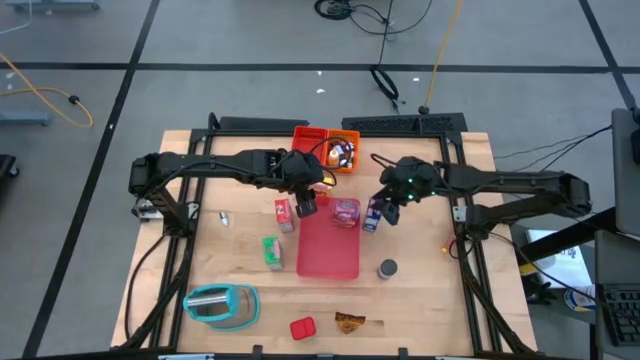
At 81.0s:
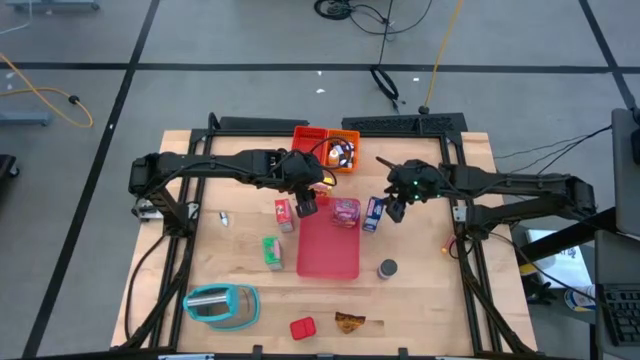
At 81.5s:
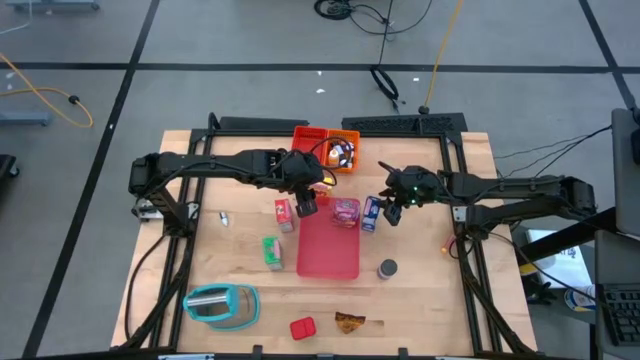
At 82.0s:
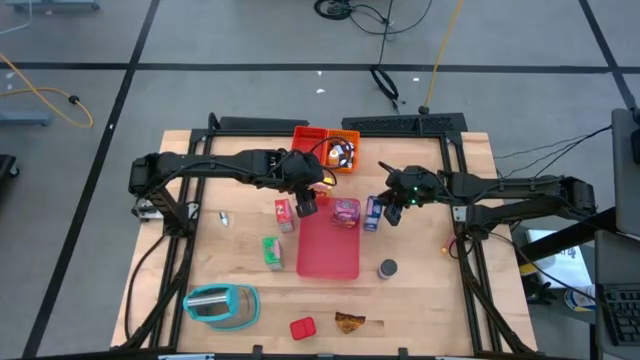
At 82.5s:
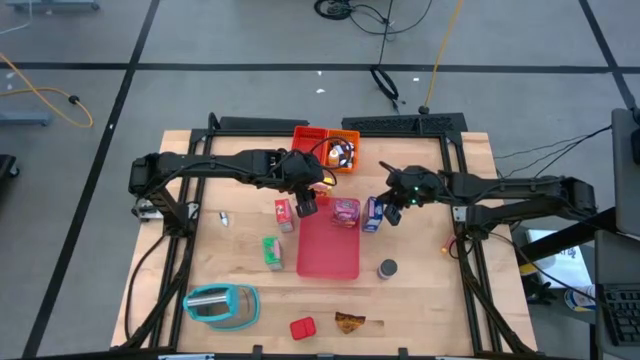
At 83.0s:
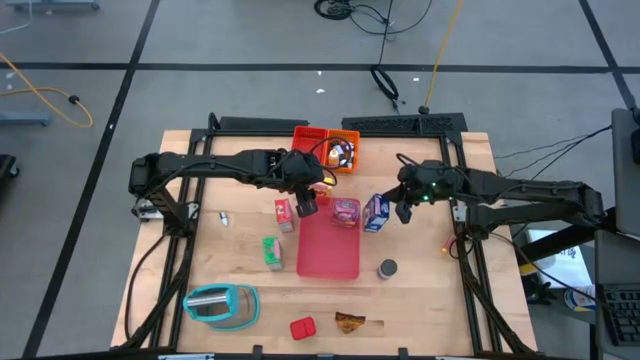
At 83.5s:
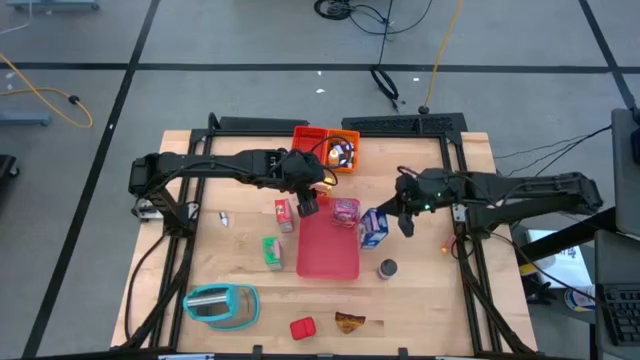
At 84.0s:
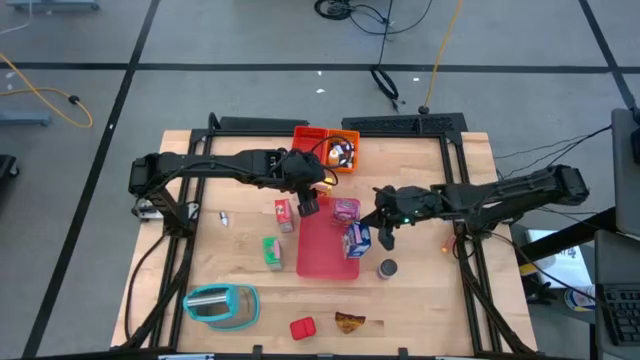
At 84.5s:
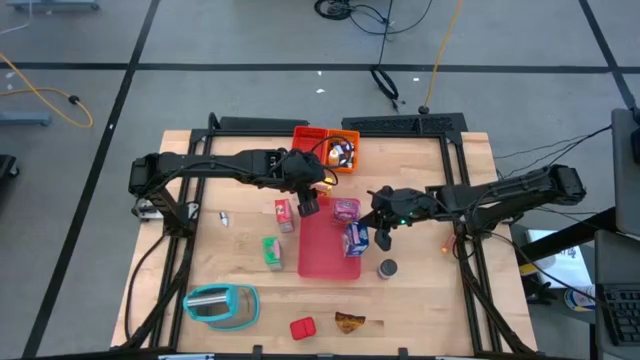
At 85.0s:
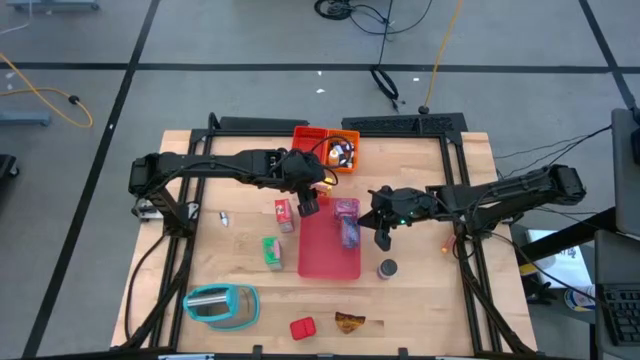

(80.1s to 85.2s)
Task: Pick & Place Kitchen Items
Put the blue cereal box into the light red bin

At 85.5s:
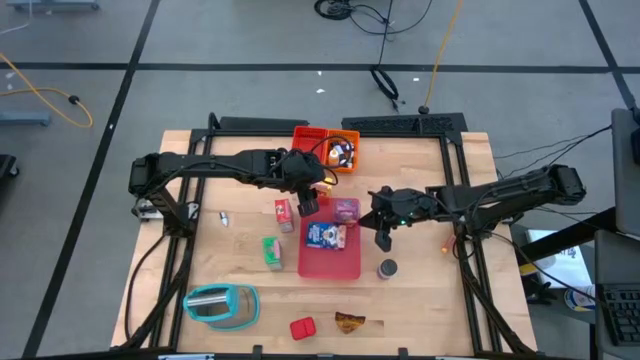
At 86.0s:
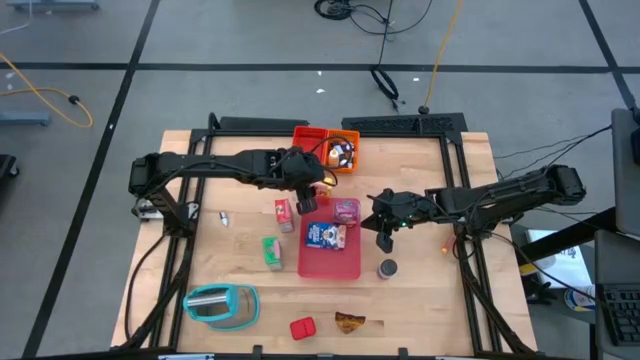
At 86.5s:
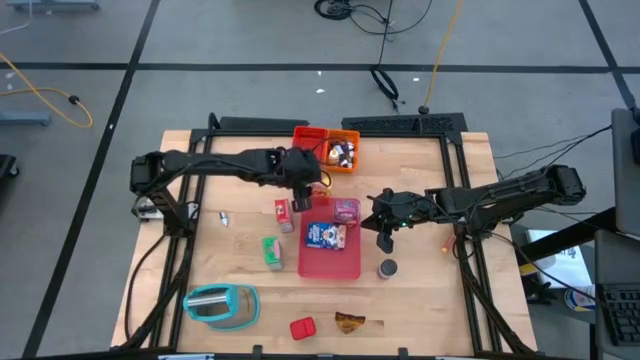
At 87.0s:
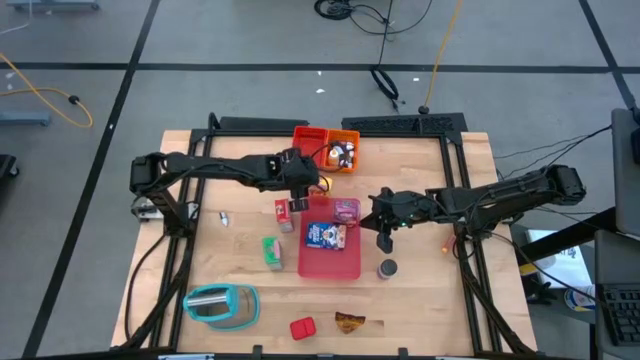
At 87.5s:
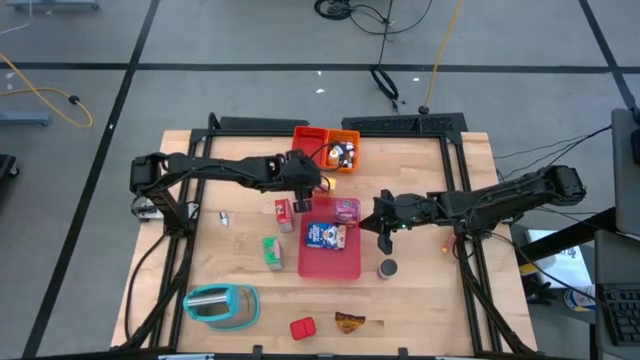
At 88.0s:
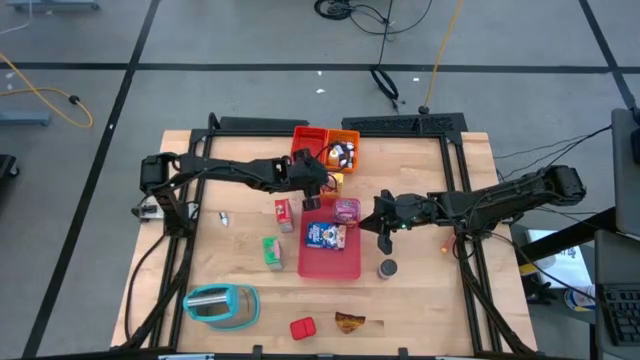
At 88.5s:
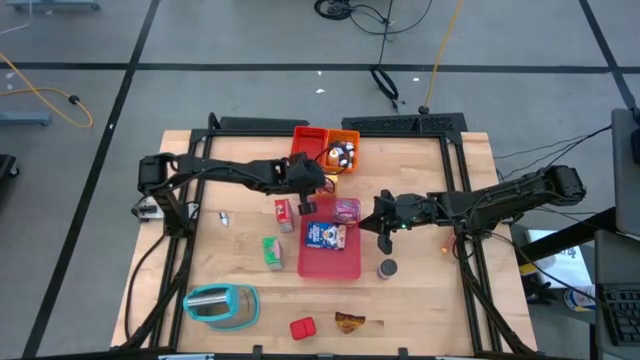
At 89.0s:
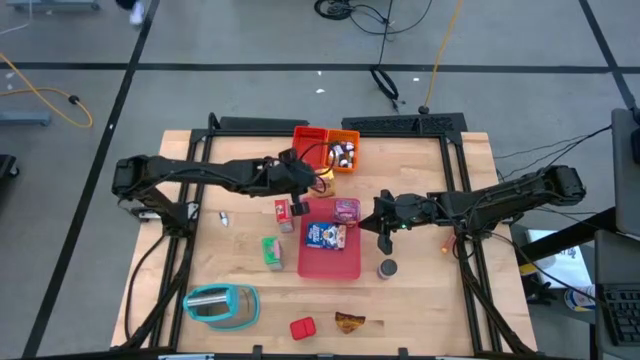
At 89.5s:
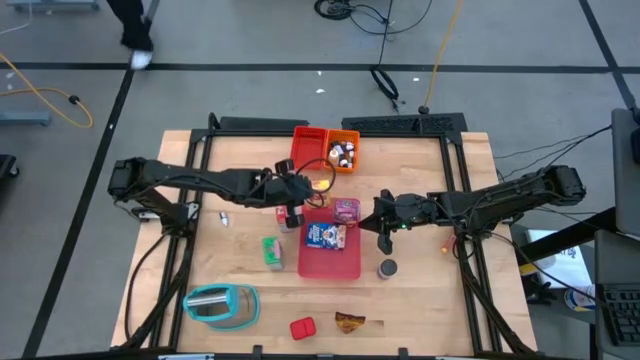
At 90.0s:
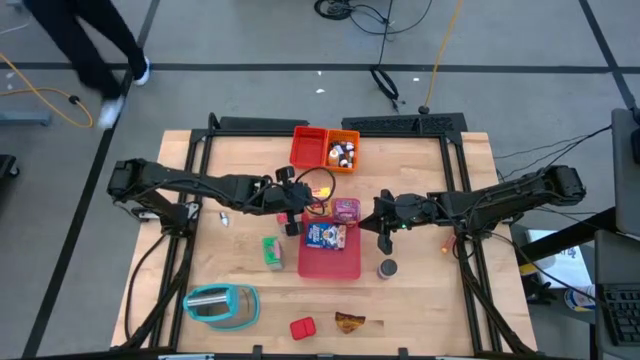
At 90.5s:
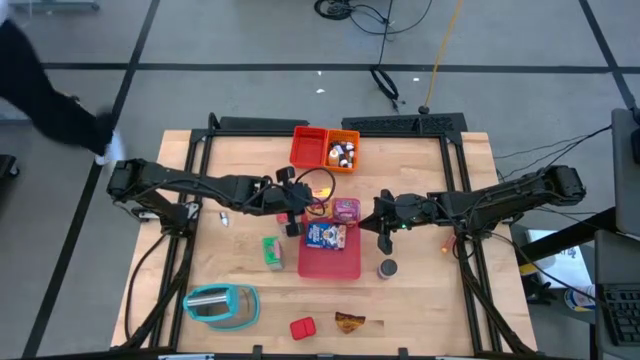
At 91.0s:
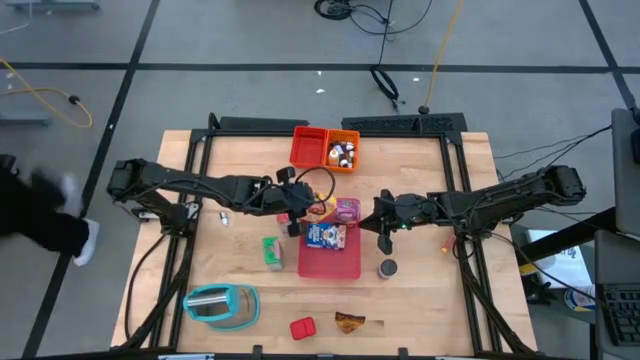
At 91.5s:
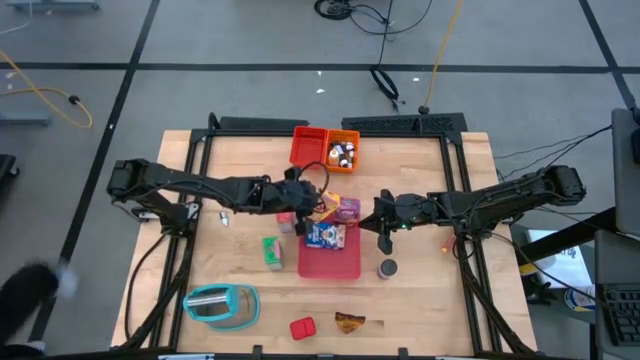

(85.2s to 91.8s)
Put the yellow cereal box into the light red bin

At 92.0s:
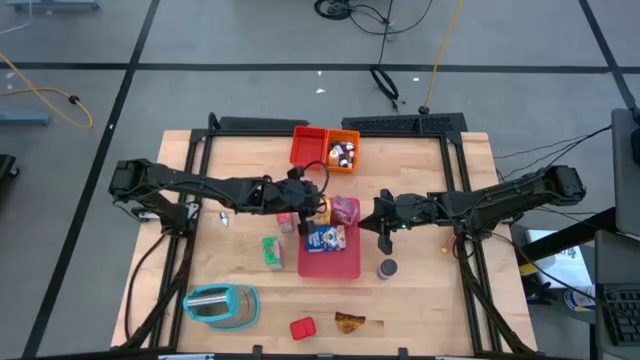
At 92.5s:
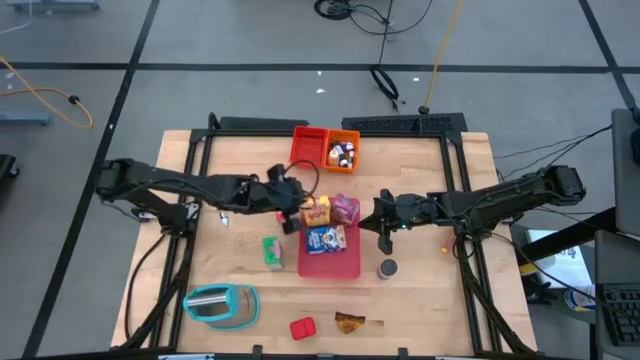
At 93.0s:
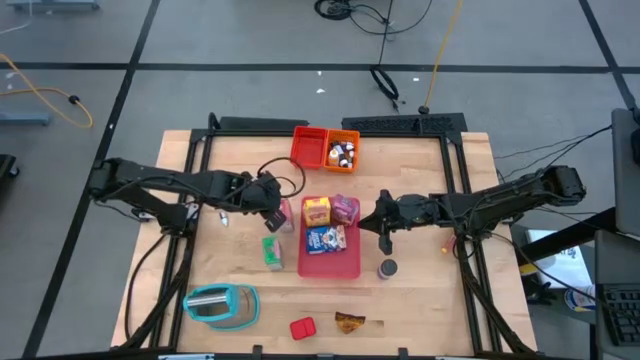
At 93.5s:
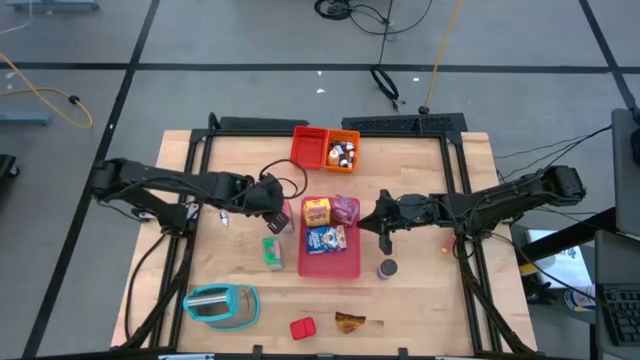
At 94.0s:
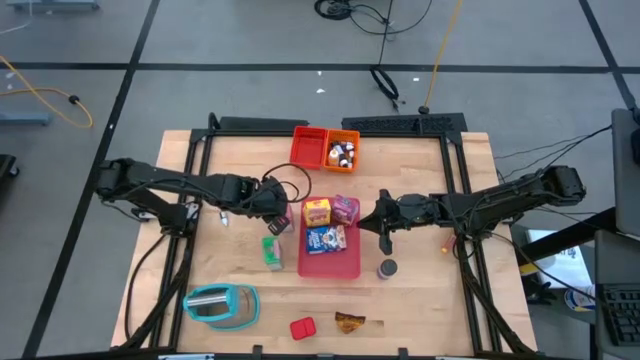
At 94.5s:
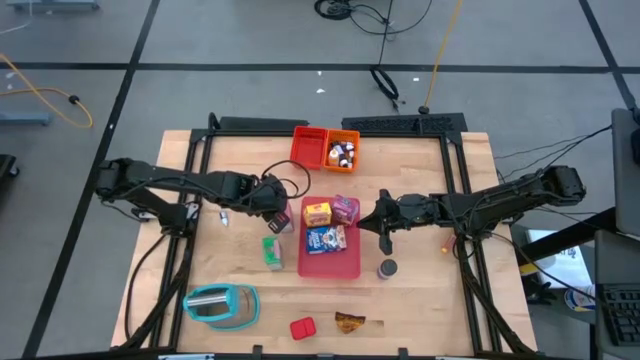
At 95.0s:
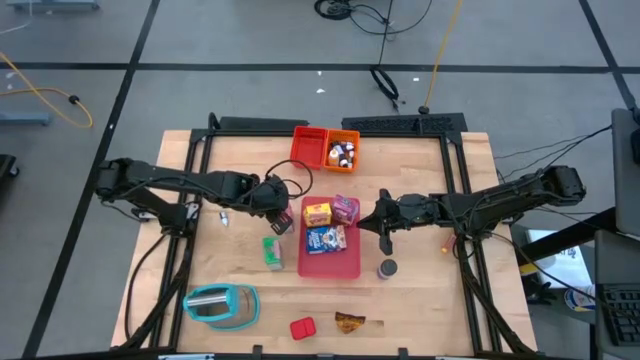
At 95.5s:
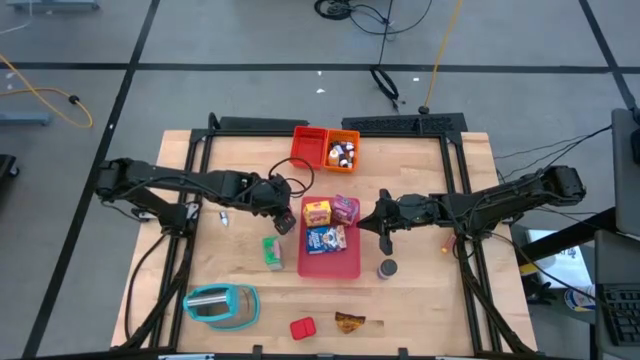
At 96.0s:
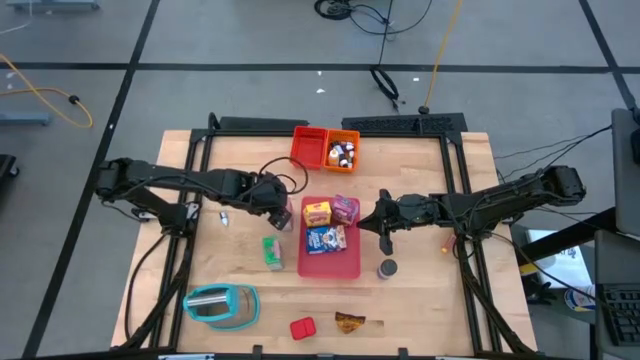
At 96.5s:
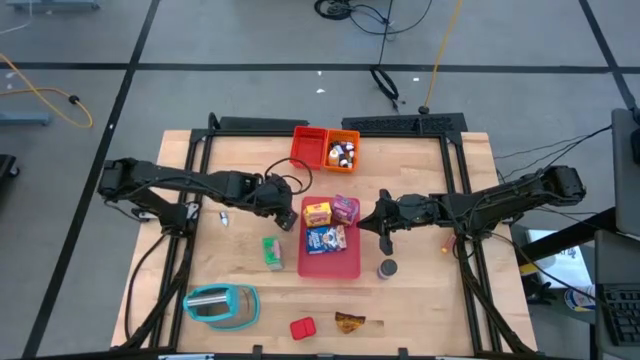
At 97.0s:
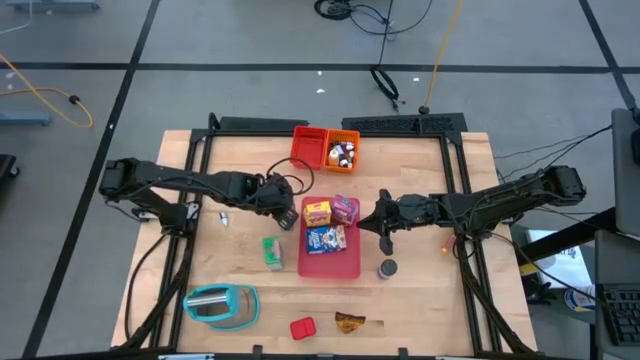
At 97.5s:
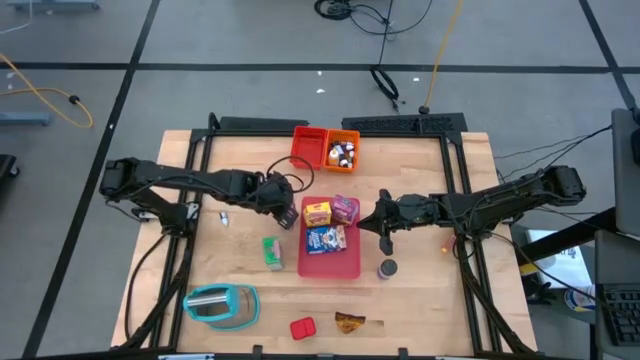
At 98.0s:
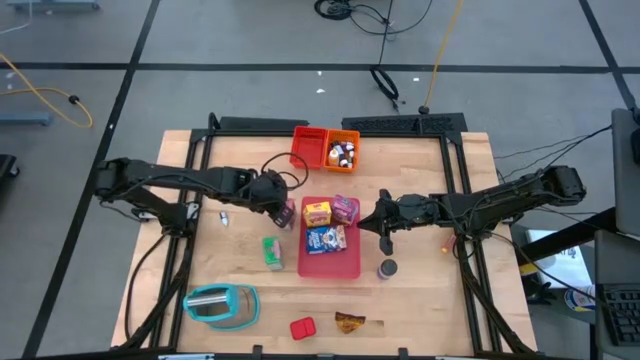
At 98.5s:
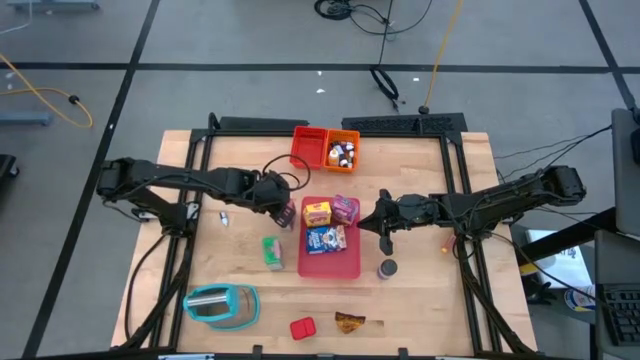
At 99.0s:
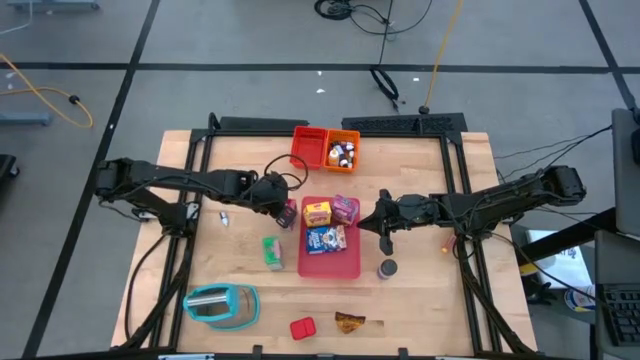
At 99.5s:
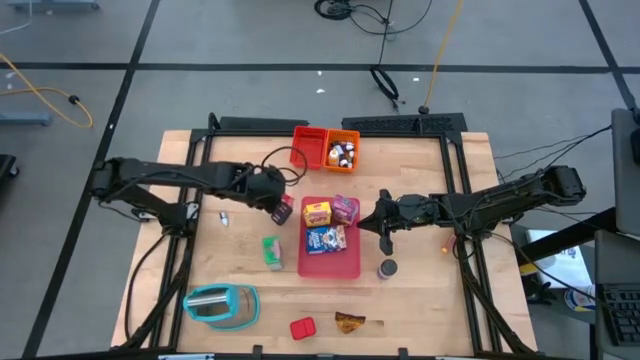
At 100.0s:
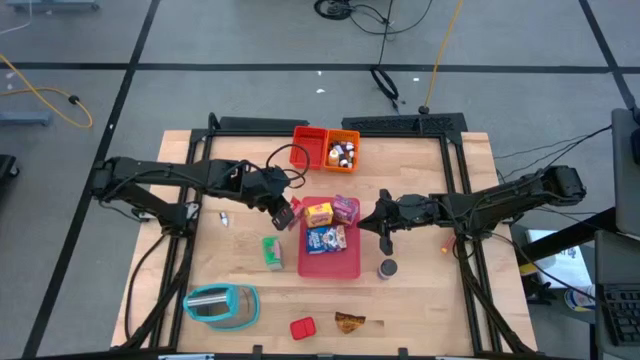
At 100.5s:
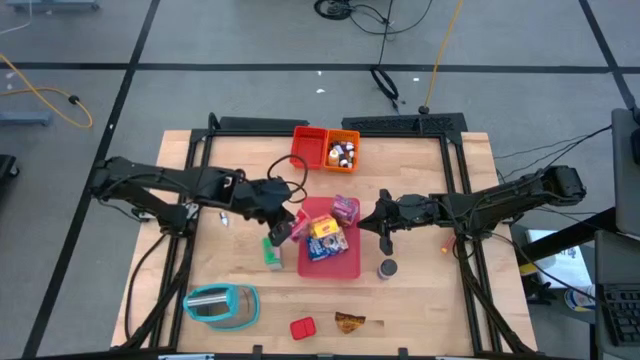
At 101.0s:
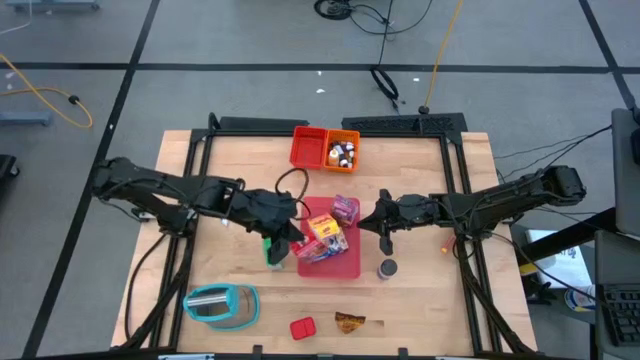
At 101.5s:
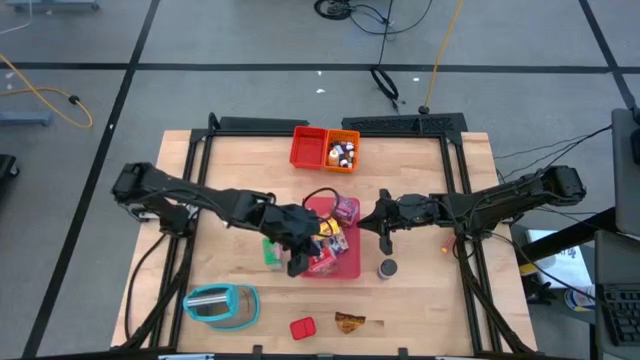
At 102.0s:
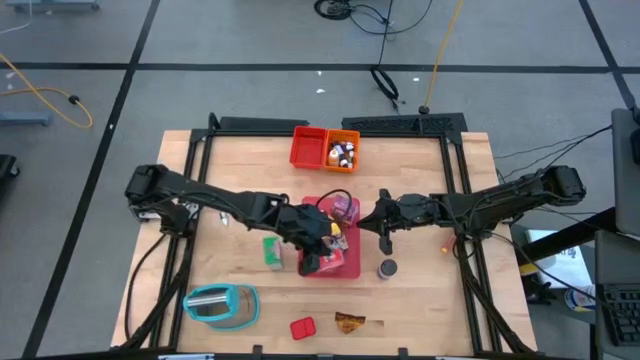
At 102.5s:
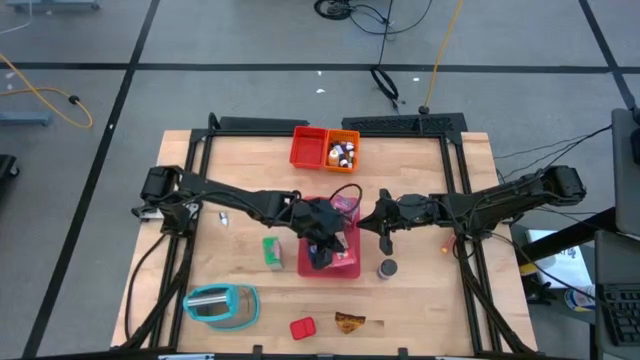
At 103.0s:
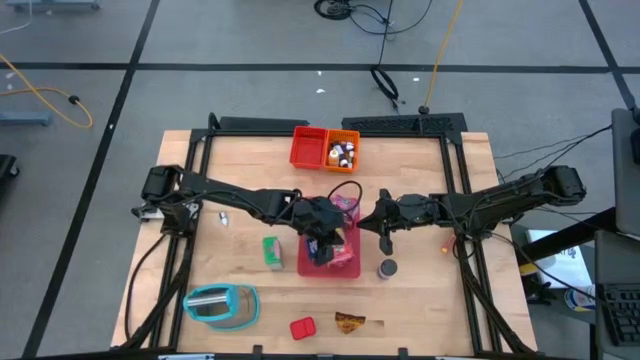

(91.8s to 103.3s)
Put the red cereal box into the light red bin
